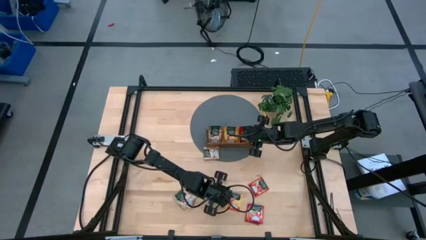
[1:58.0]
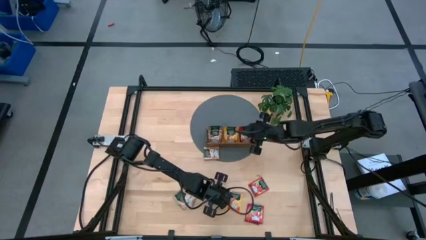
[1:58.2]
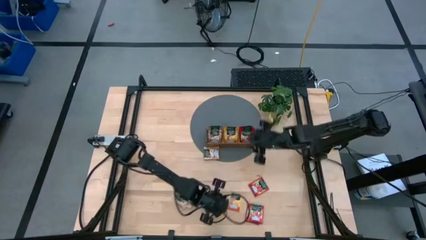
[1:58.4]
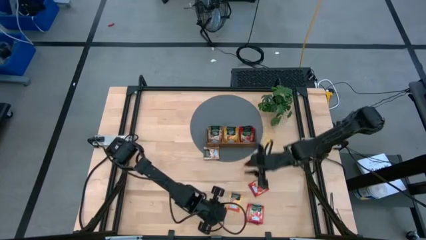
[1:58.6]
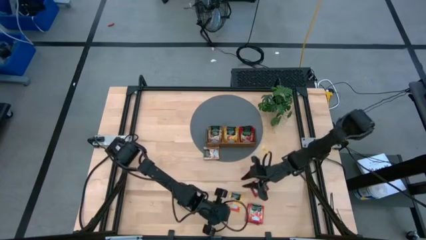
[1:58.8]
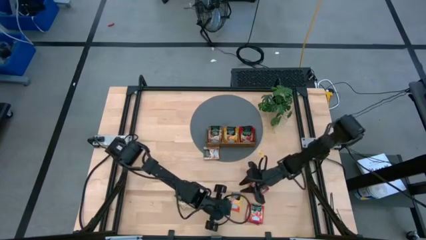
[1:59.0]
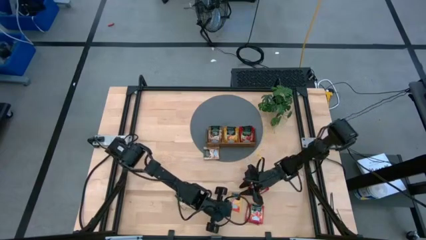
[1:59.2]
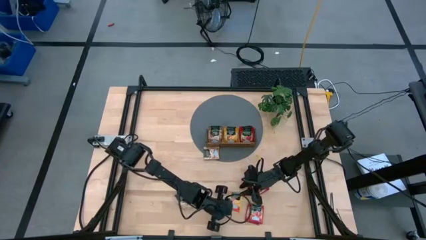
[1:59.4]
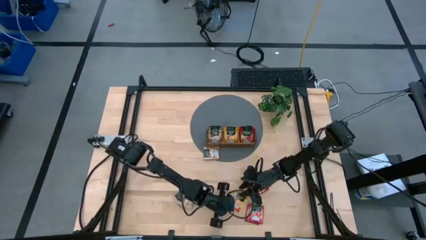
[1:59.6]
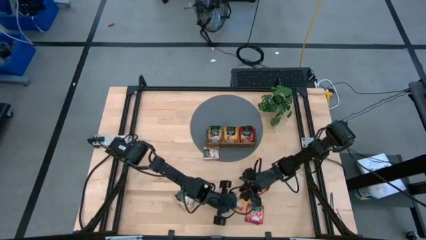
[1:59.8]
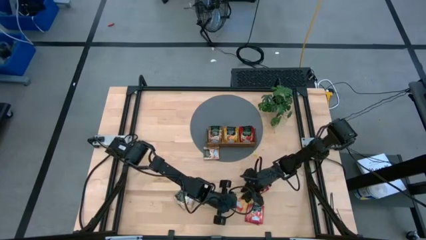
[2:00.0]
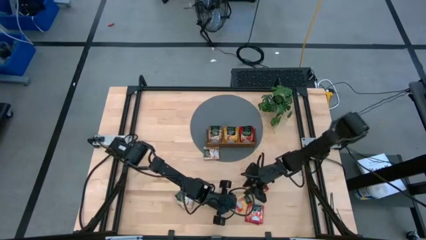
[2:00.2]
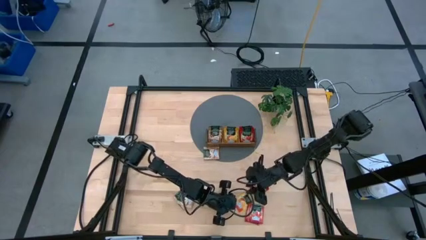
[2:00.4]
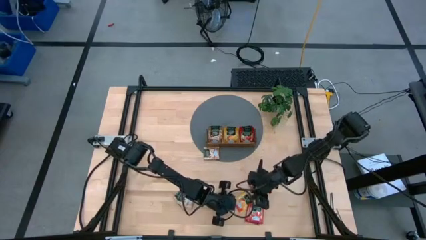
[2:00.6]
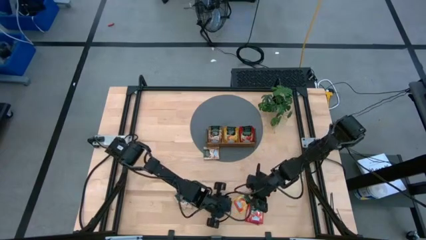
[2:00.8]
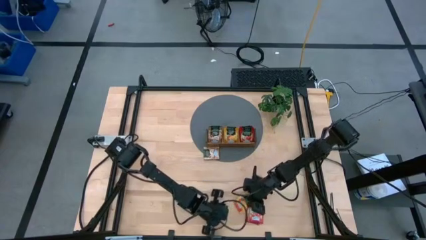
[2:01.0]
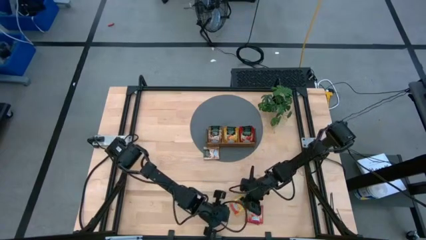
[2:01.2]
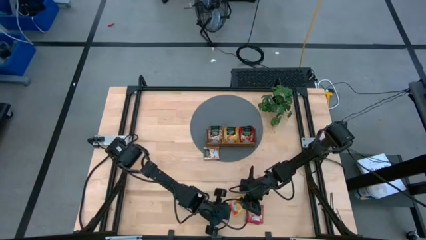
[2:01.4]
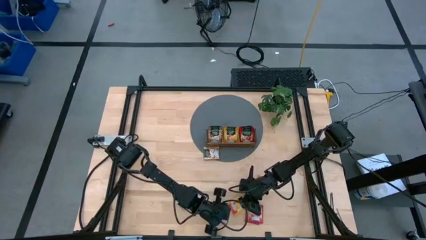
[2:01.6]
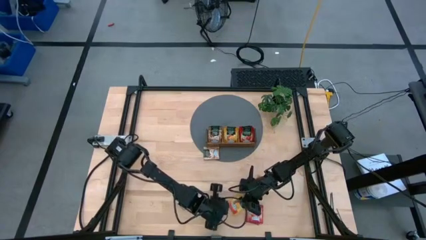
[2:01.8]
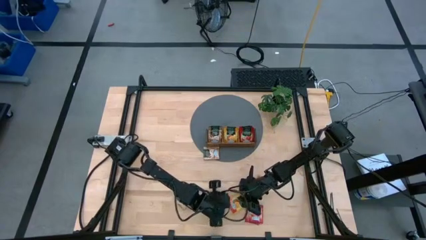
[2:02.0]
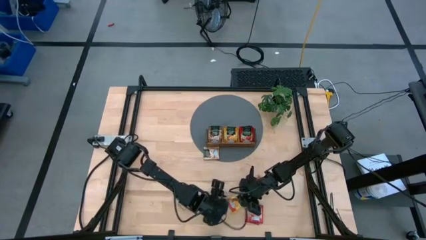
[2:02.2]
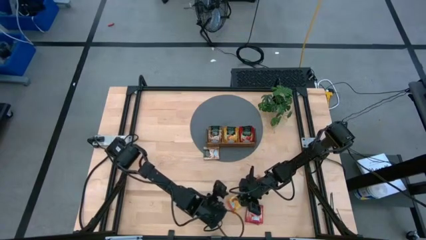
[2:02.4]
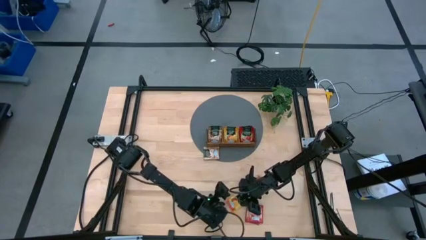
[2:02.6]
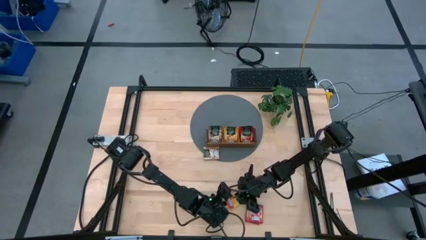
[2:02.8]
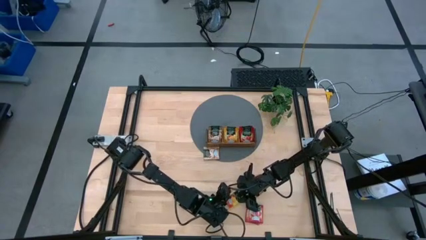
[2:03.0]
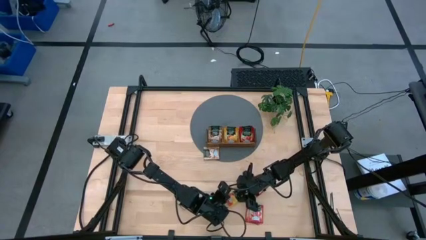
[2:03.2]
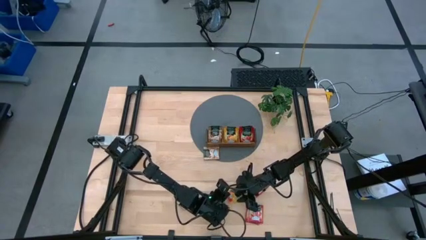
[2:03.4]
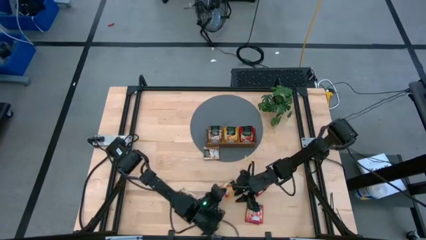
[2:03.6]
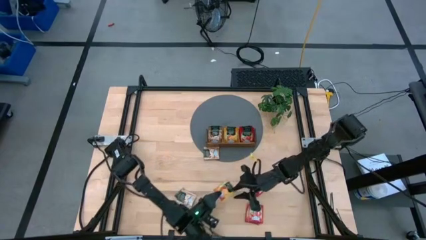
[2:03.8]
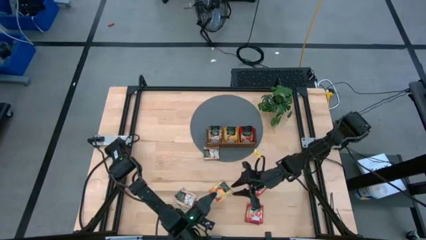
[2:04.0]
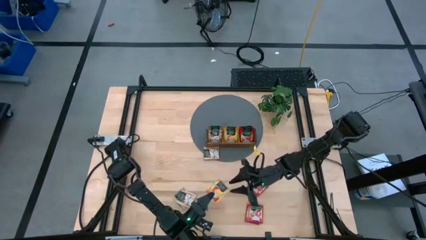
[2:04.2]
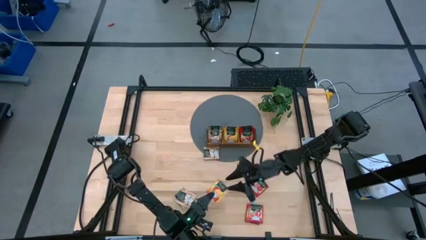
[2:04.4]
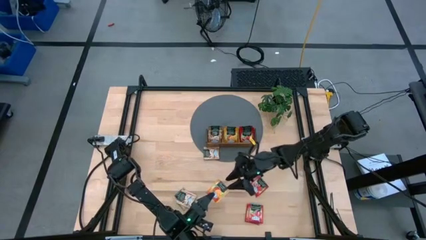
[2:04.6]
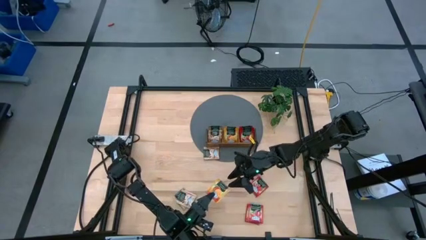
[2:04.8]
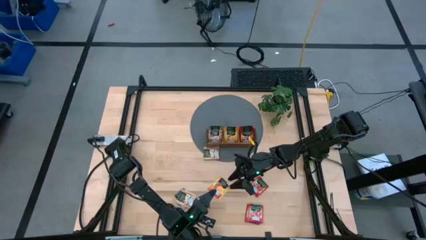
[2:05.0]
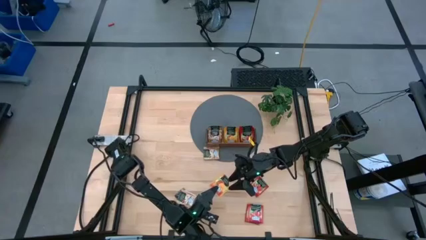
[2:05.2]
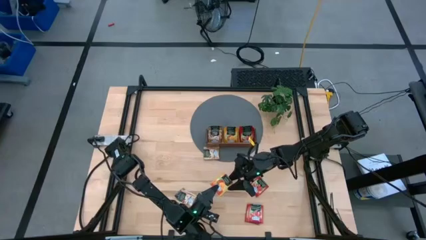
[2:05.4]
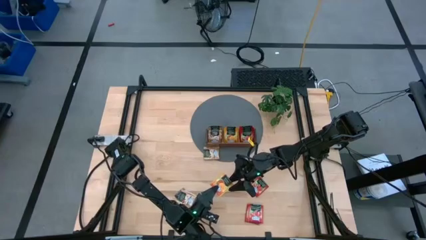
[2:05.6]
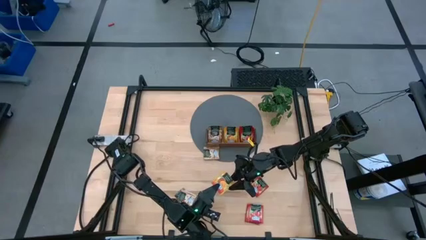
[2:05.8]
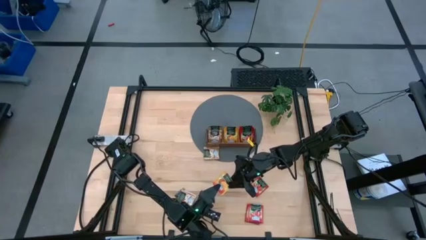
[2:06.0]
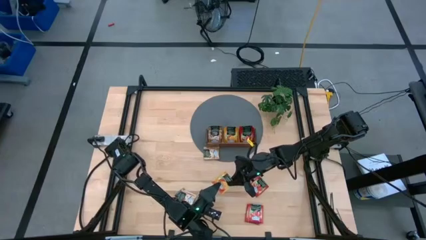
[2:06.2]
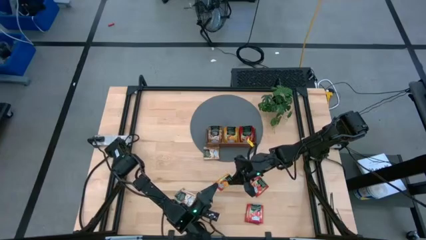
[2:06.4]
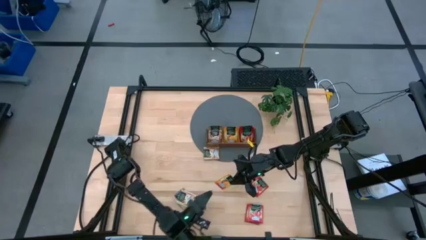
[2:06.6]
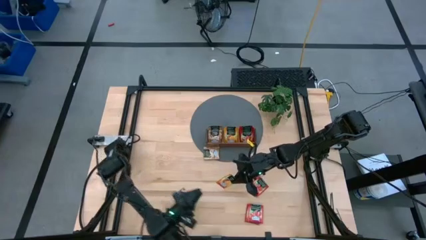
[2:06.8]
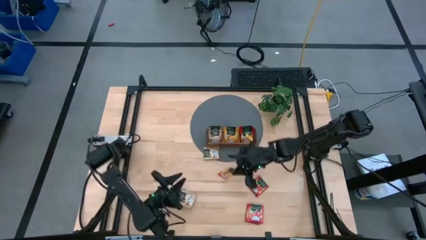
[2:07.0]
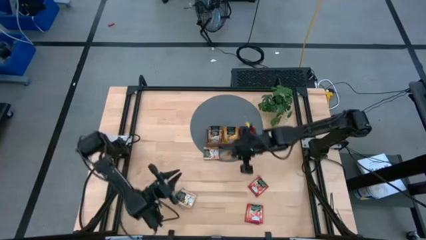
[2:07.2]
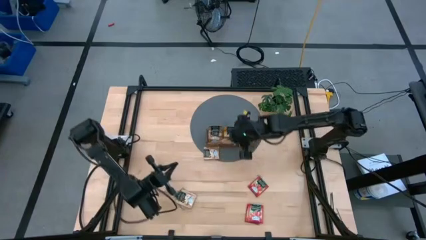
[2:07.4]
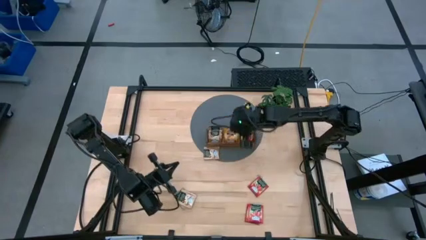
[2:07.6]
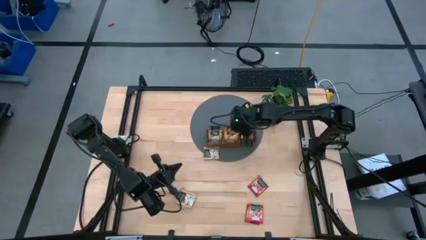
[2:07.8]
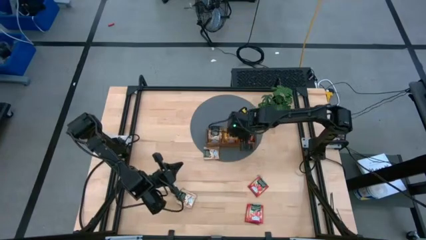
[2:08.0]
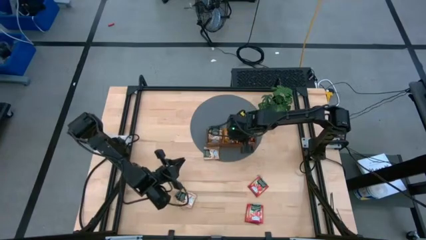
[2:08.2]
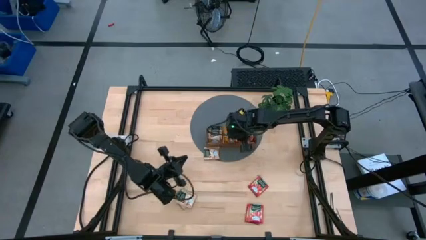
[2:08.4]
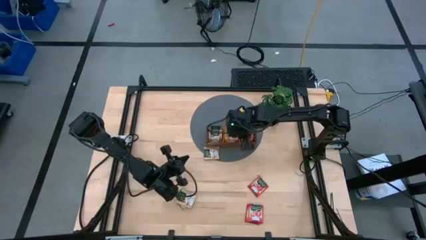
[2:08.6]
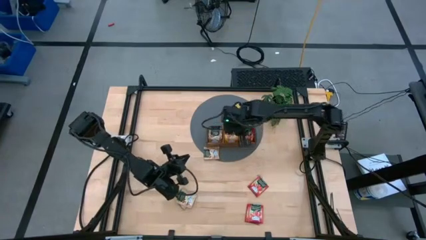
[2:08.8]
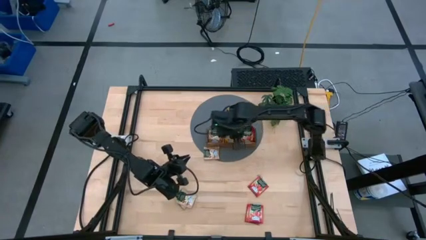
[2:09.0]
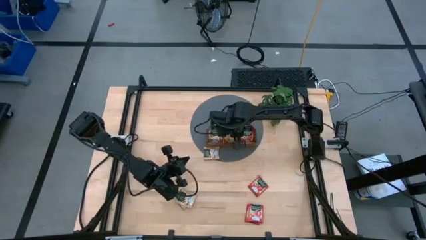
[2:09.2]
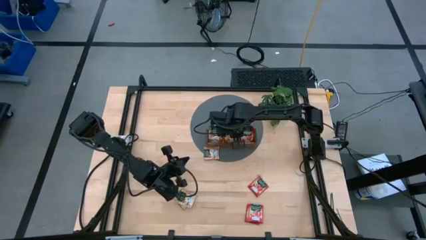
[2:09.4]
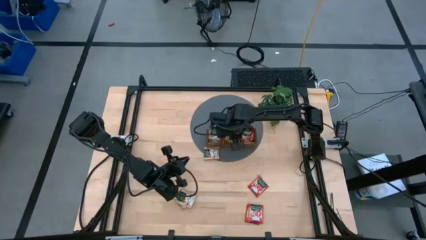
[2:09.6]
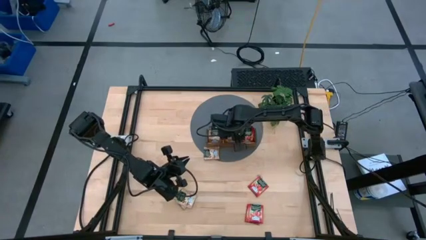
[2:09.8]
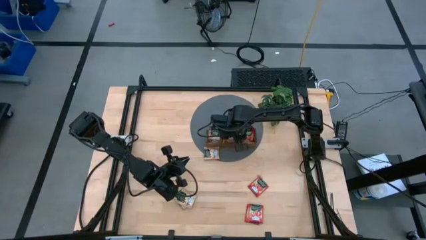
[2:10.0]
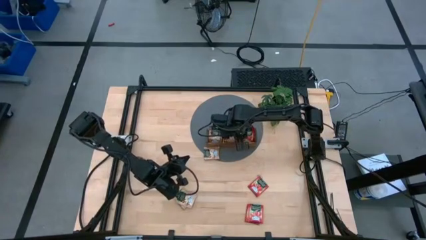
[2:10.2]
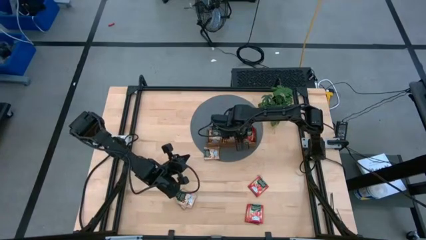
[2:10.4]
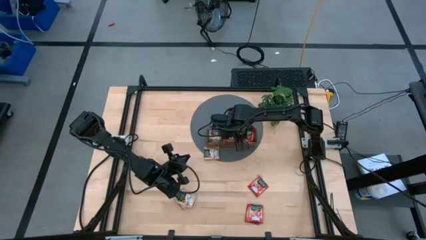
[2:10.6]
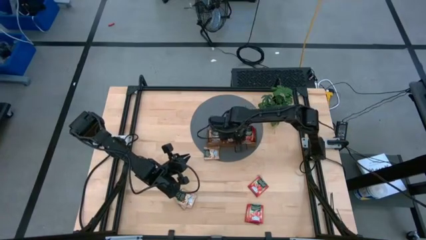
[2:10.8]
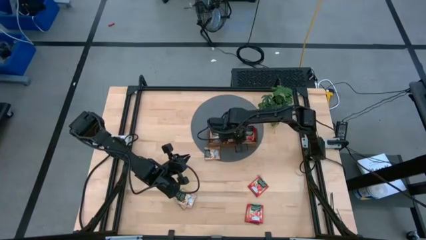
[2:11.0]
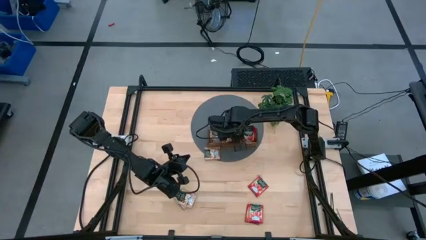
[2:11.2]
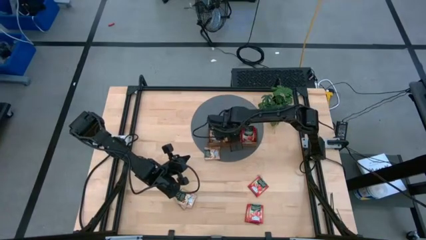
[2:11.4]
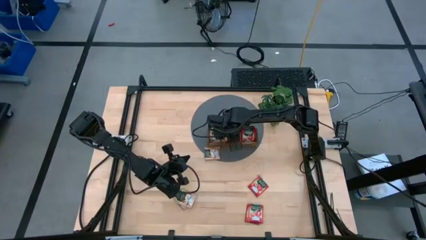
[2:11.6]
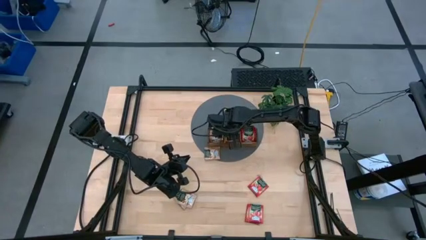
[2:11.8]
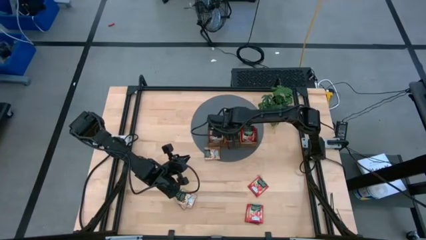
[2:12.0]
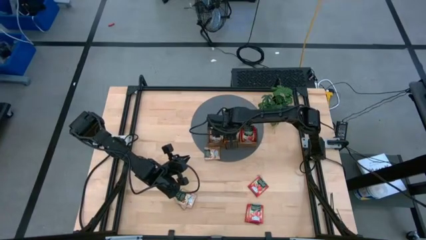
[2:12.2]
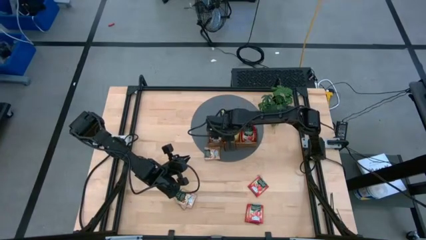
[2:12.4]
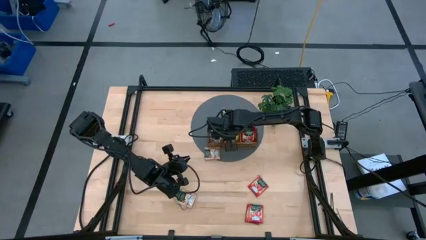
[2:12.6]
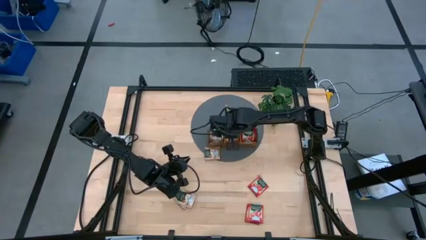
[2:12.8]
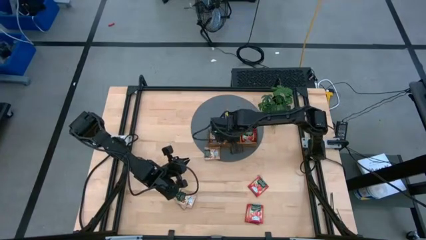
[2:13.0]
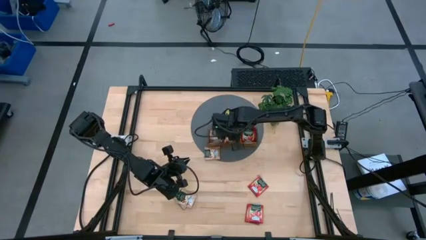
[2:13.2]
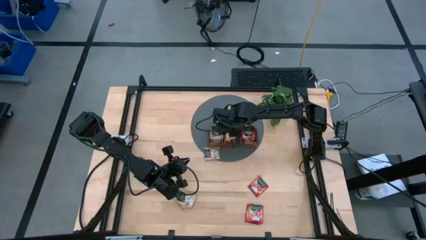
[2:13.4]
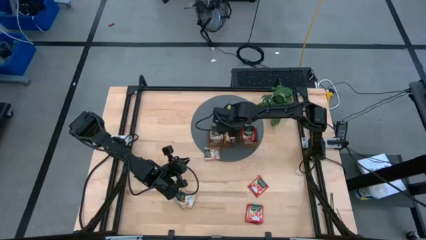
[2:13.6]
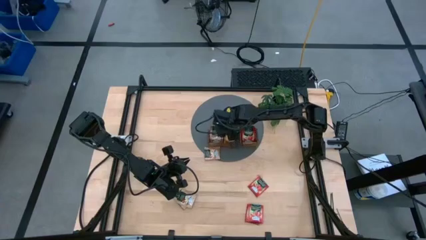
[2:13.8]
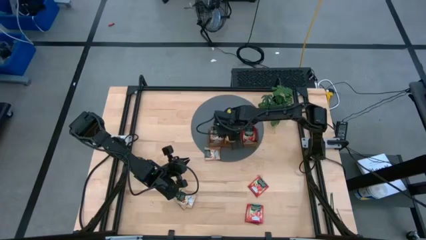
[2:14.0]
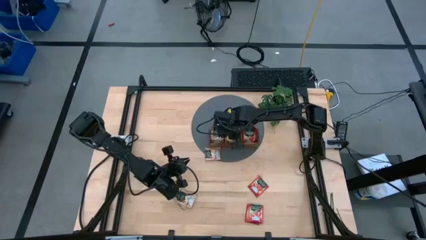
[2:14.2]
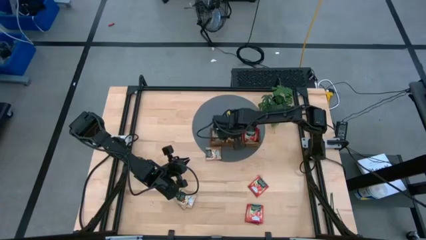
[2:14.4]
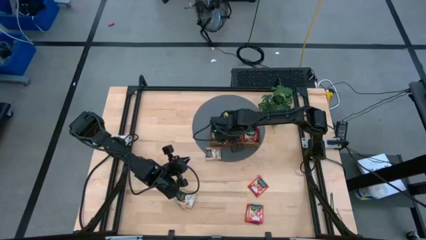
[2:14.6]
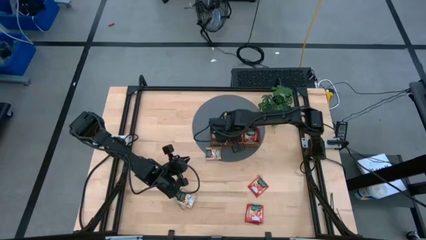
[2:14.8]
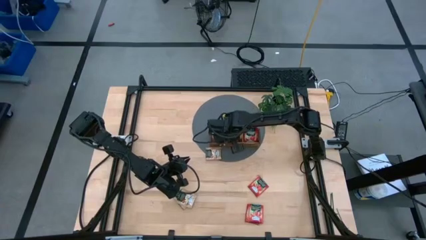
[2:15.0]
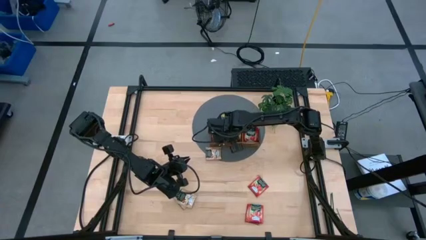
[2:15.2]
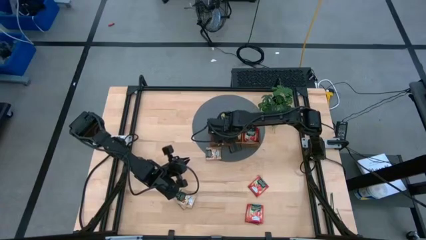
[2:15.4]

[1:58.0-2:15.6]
Task: Pick & Place Tea
Put the orange tea packet into the middle section of the wooden organizer
